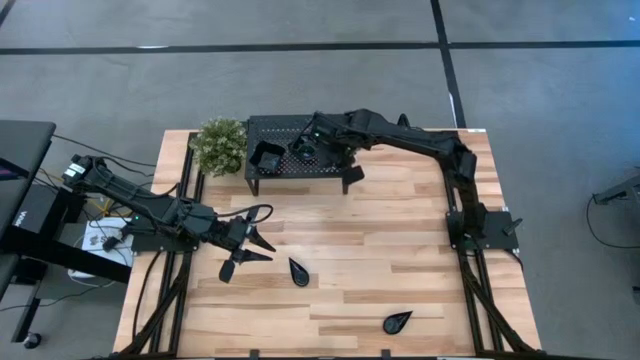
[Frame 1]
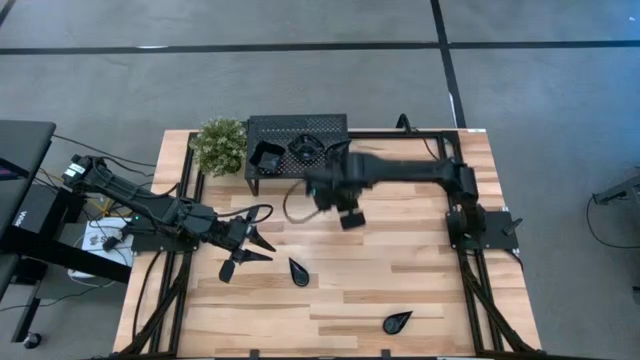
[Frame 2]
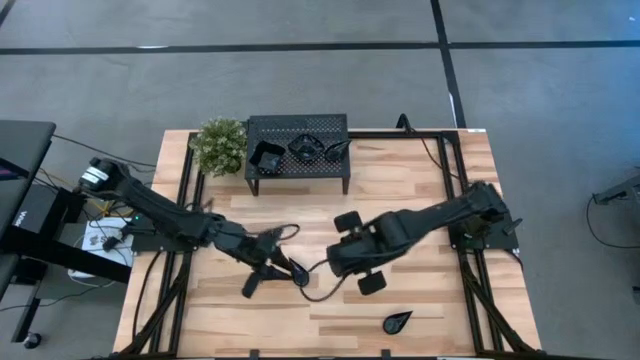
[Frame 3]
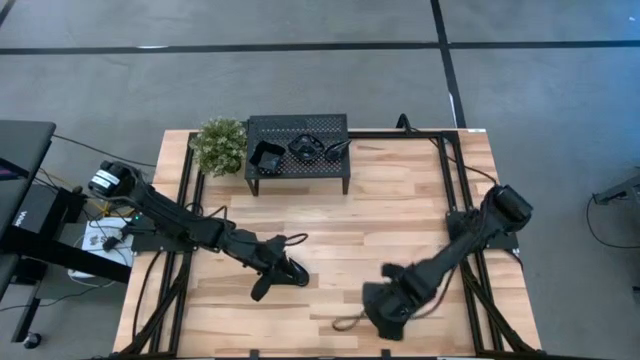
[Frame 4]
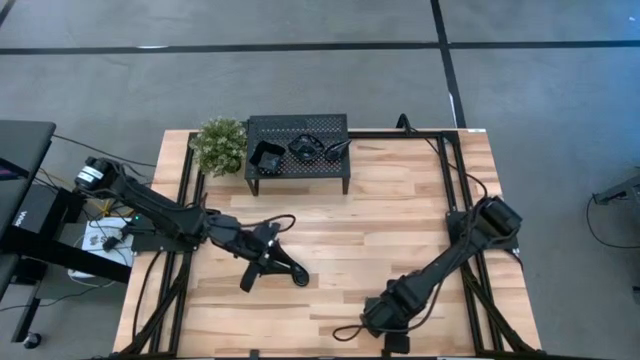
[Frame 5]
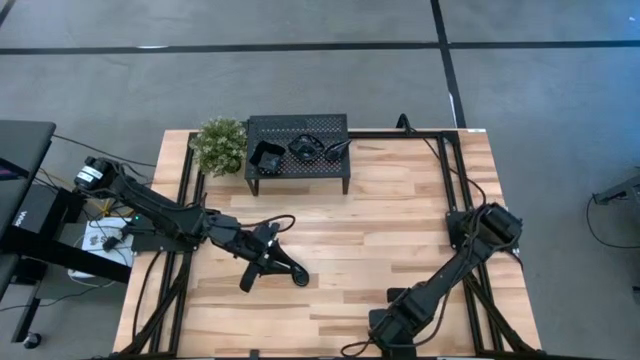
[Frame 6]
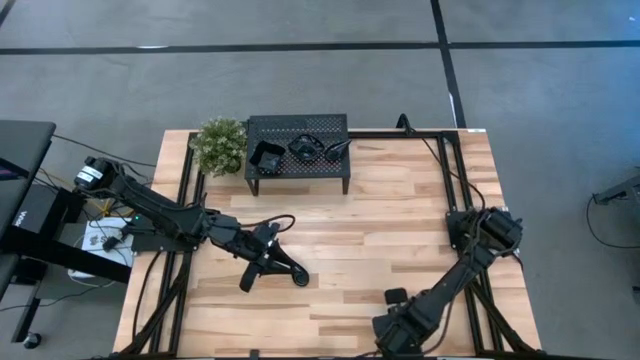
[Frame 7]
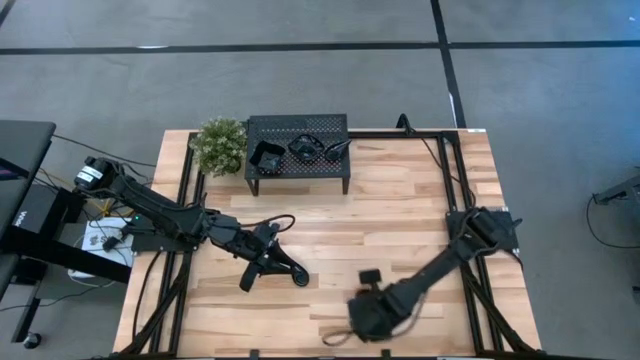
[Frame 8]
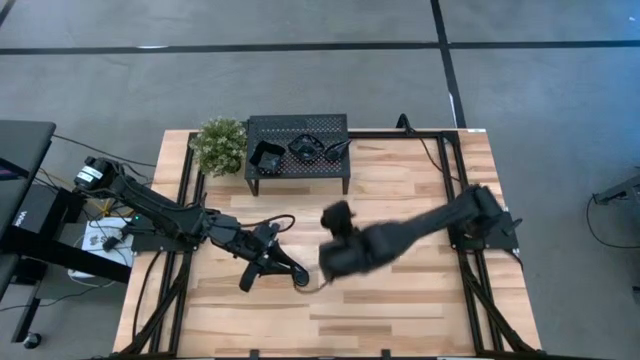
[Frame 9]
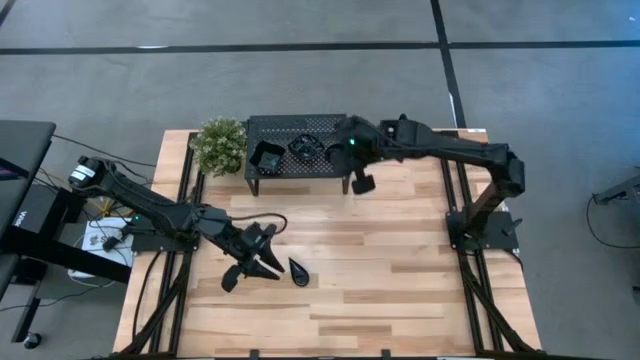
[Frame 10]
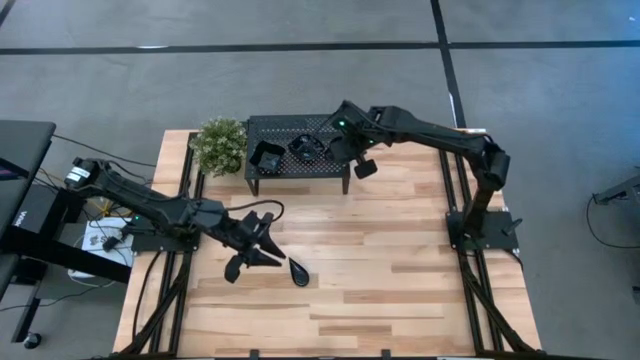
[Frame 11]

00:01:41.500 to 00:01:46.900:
Task: Pick & Place Mini shaped plates
Stack the drop shaped plate on top of the drop shaped plate on the shelf

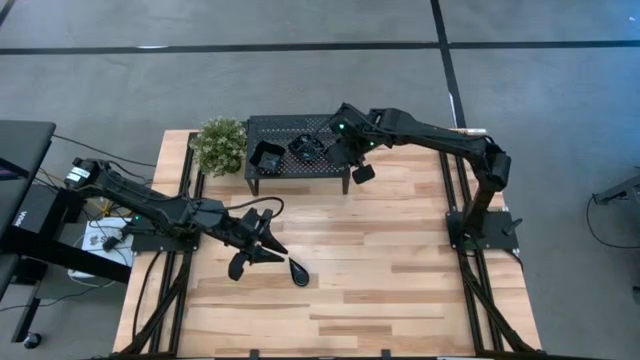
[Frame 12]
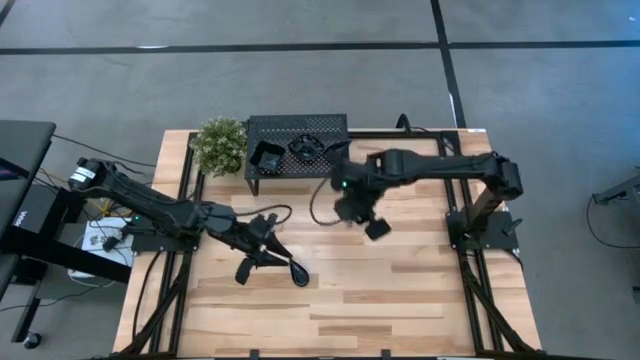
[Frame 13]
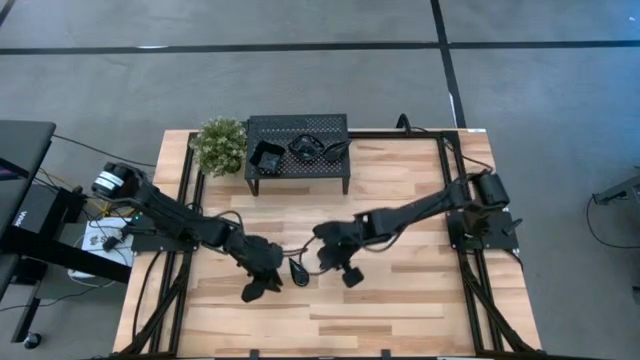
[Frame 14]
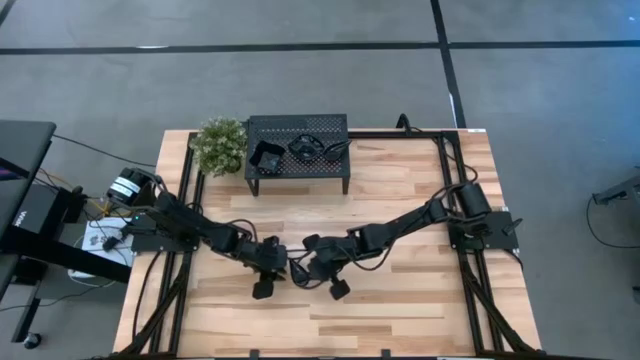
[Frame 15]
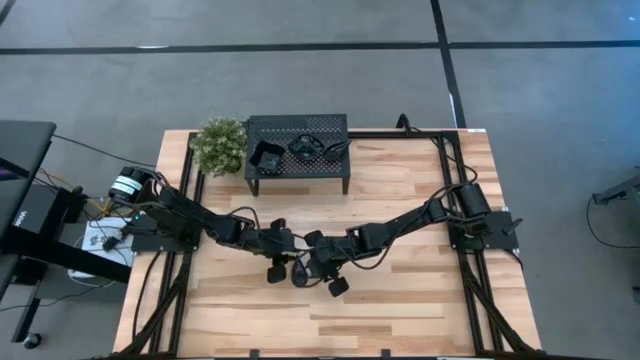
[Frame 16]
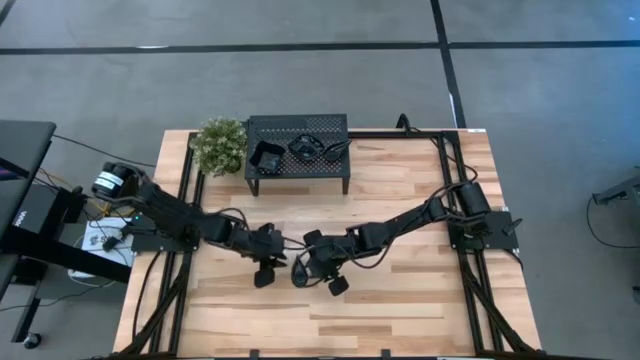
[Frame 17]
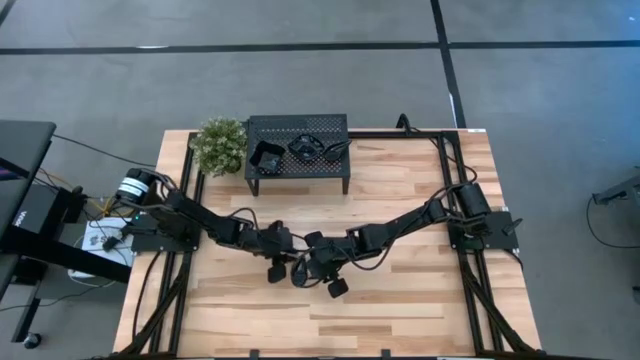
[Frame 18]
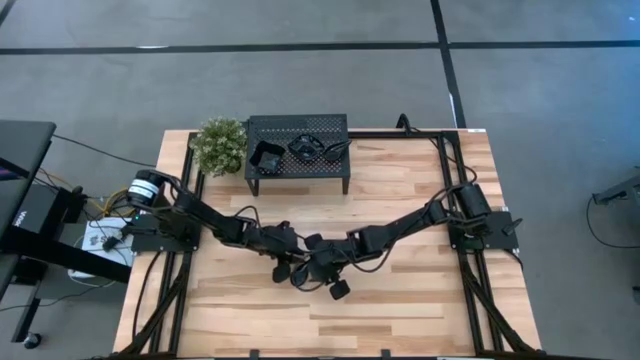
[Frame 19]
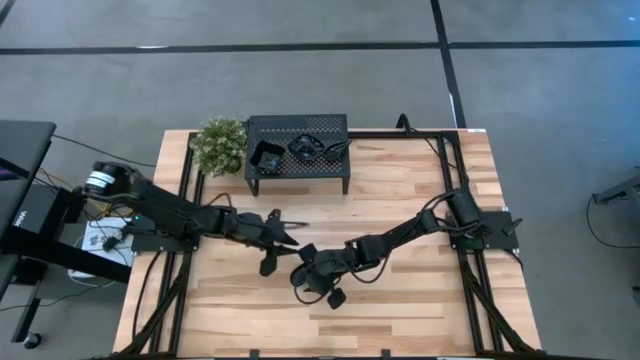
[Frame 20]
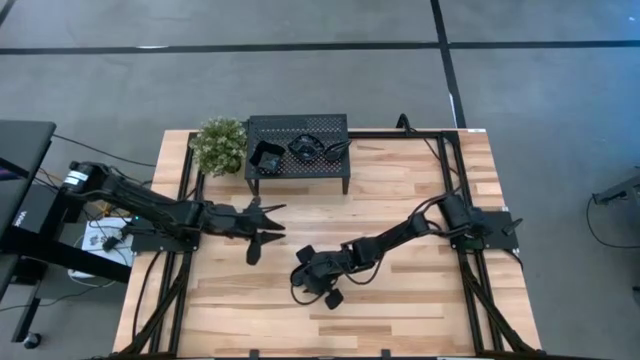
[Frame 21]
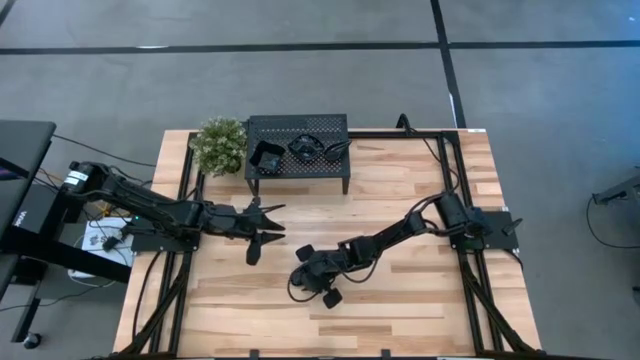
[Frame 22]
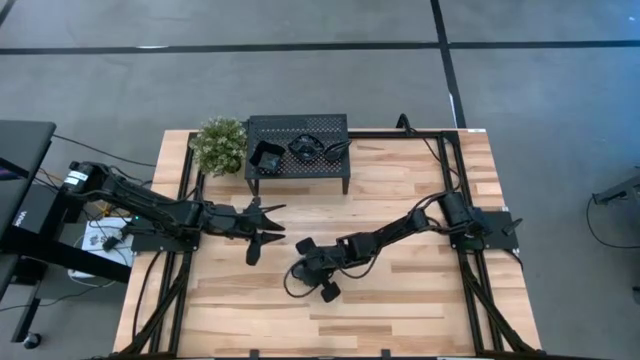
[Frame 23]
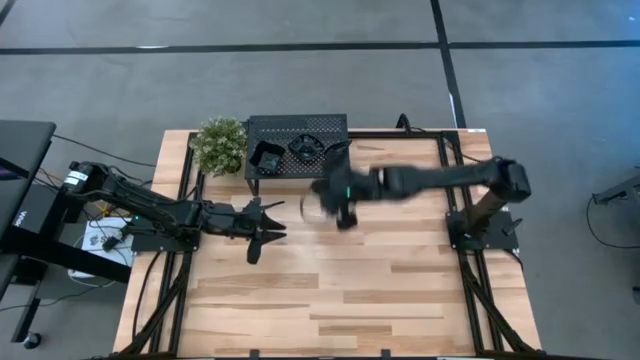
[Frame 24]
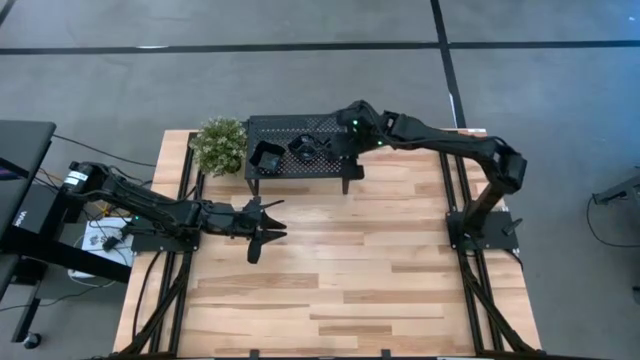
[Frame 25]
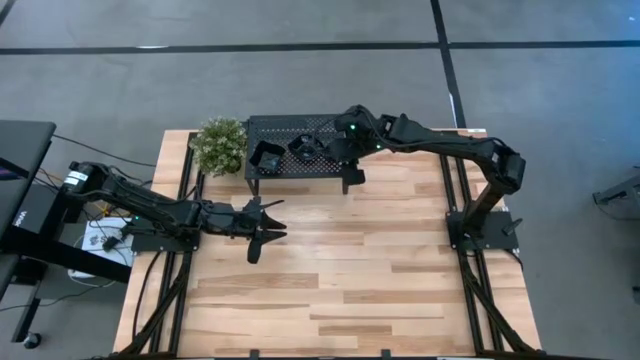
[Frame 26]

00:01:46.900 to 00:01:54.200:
Stack the drop shaped plate on top of the drop shaped plate on the shelf

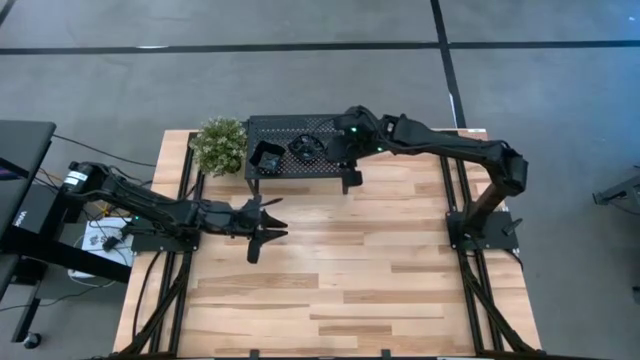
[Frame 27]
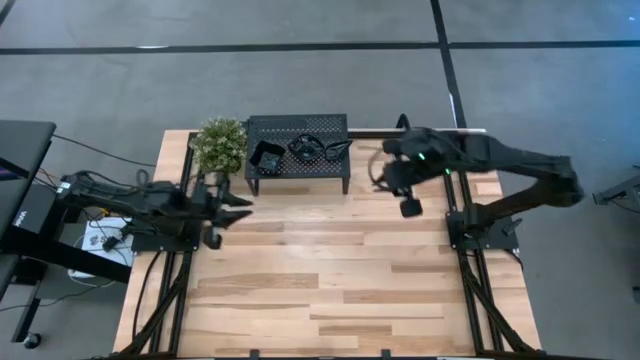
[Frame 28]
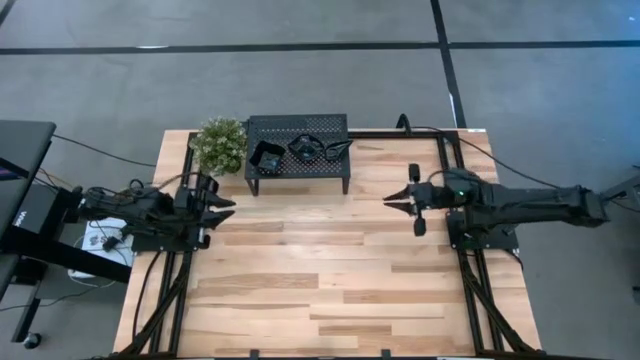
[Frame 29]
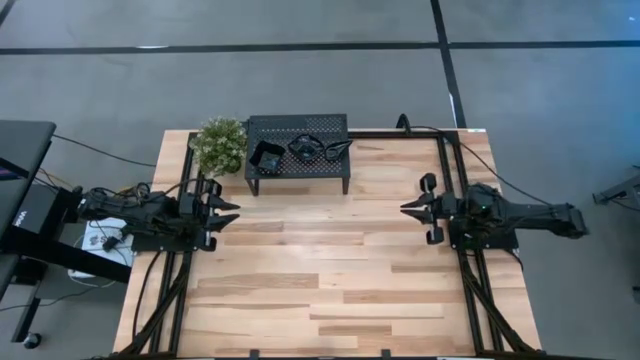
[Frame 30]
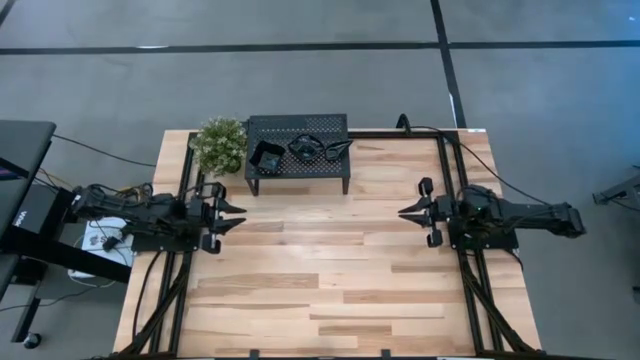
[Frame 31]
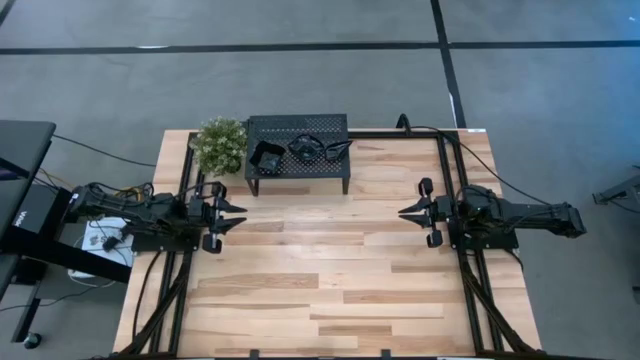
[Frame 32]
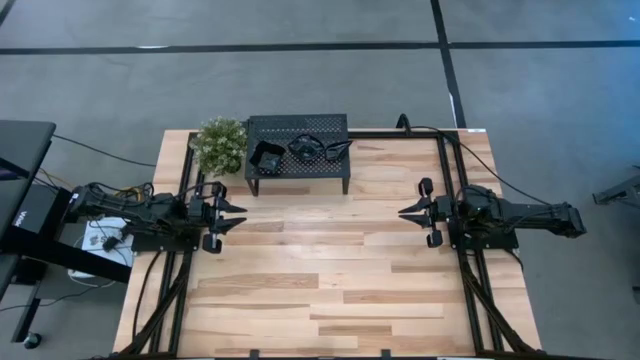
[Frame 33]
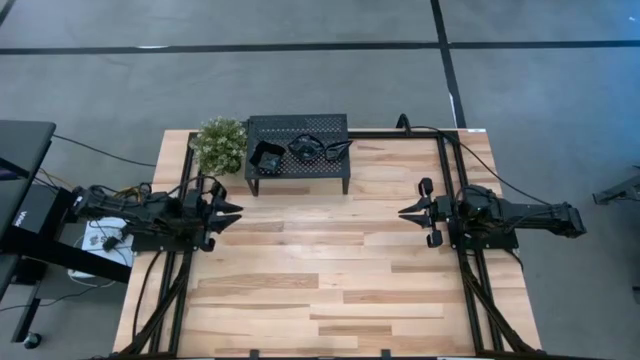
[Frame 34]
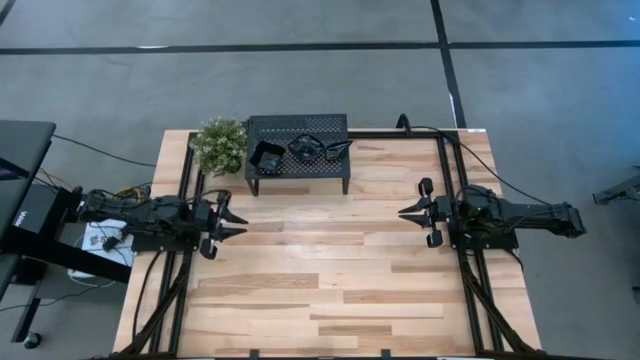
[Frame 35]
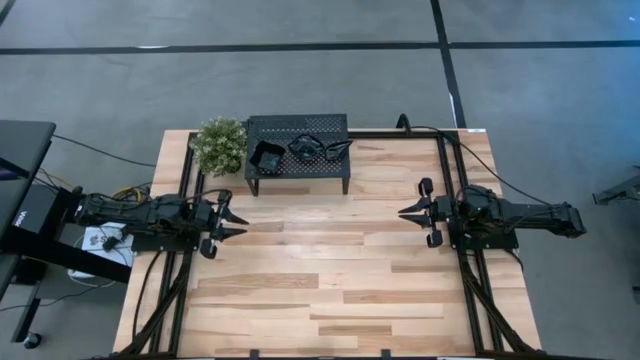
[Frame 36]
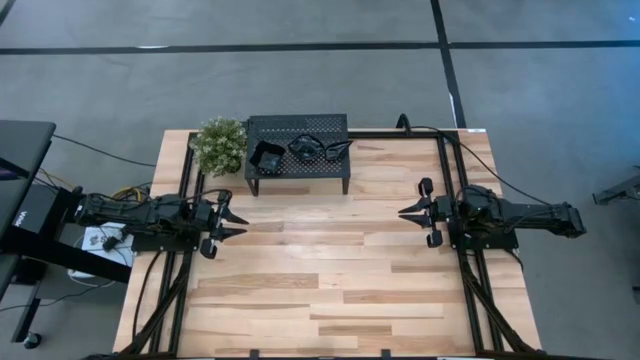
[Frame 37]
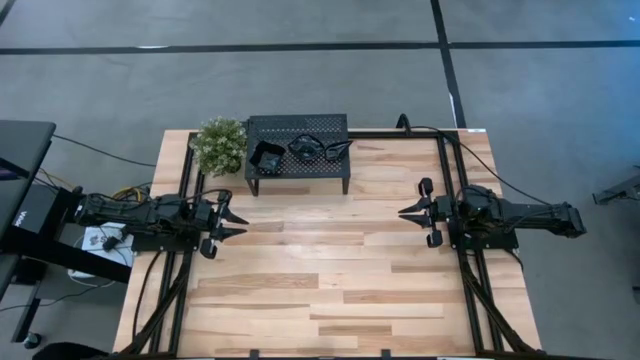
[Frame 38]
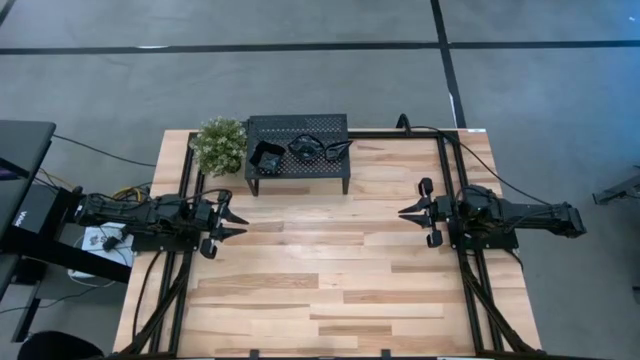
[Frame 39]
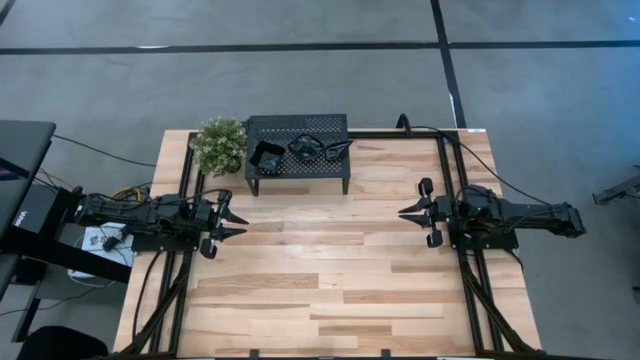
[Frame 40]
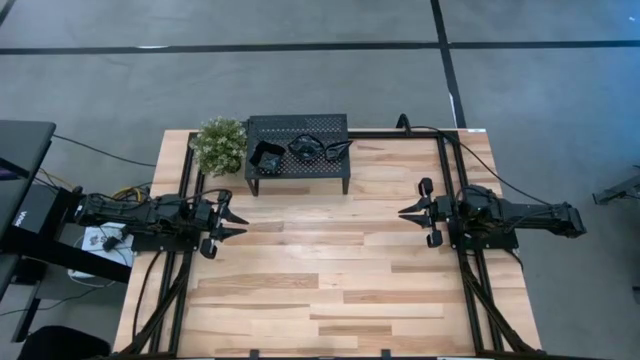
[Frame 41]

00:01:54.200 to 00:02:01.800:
Return to Home Position

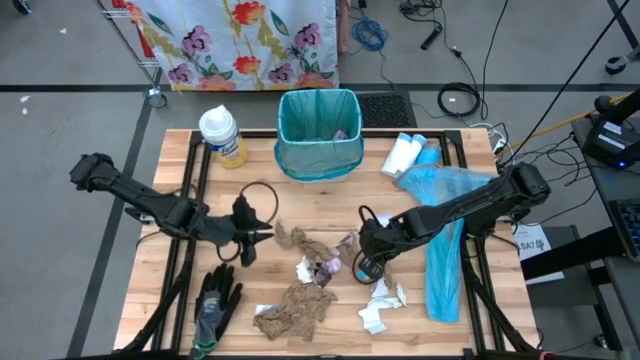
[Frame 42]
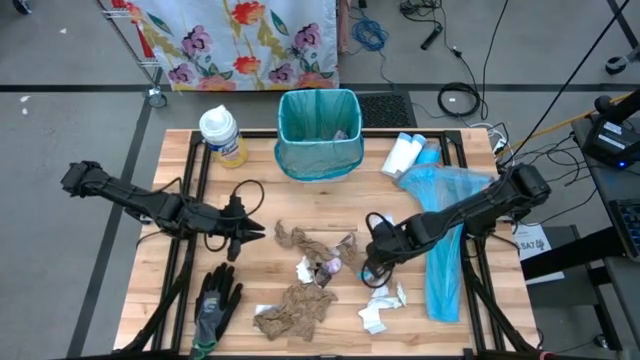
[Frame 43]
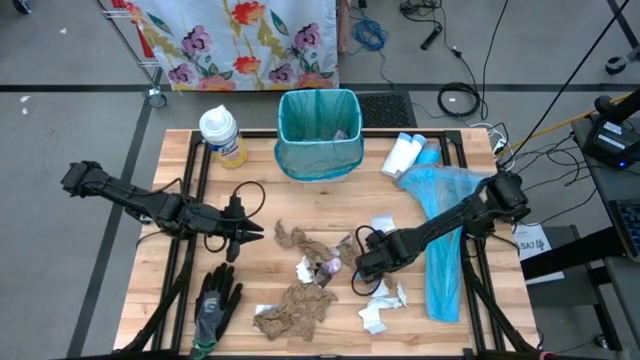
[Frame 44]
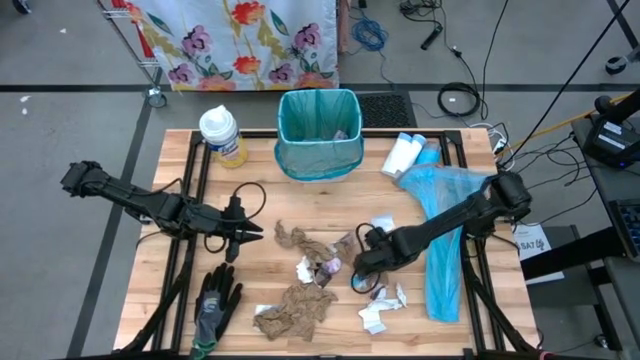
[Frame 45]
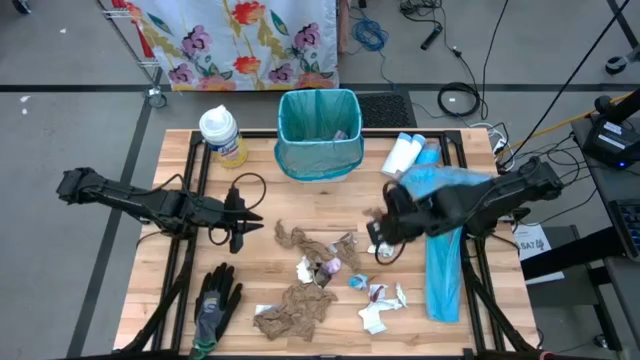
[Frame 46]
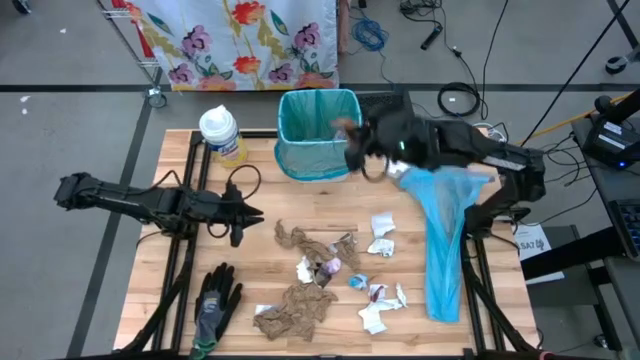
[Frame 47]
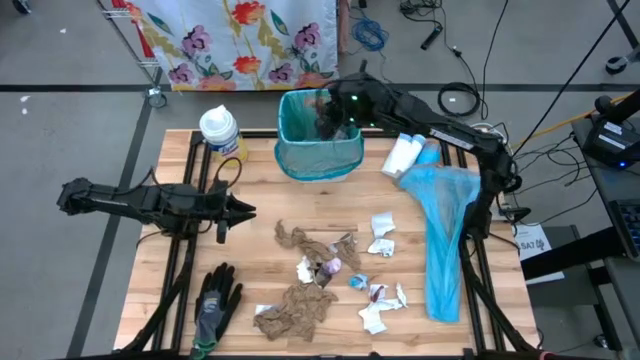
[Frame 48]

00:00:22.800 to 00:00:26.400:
Task: place trash/remove bag and relplace
Put the brown napkin into the white trash bin
